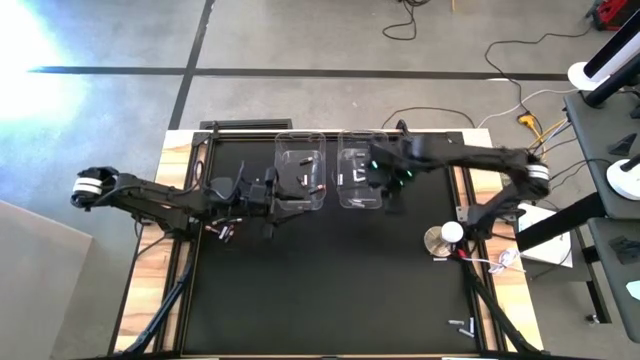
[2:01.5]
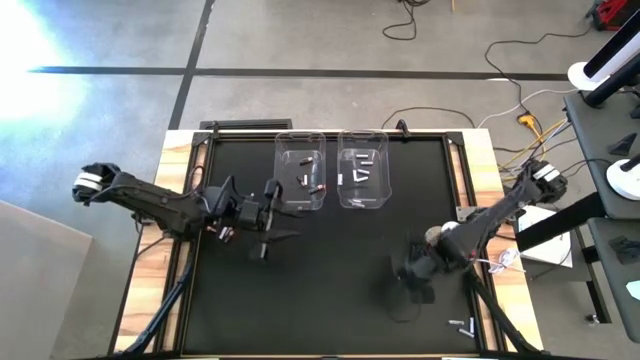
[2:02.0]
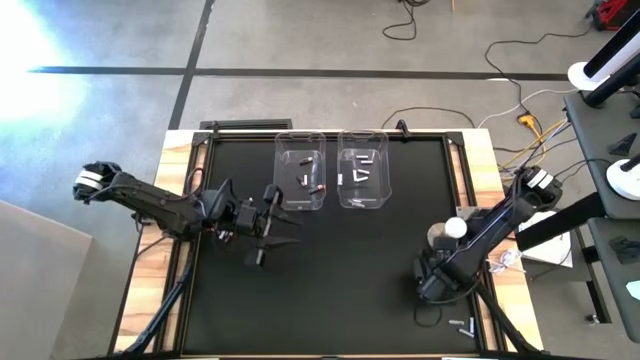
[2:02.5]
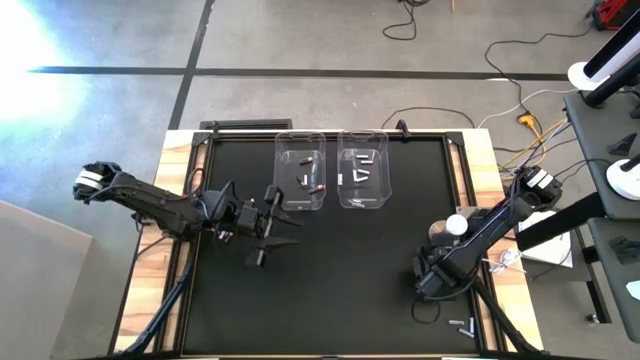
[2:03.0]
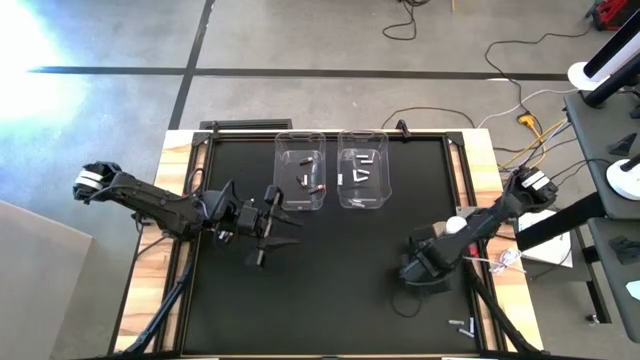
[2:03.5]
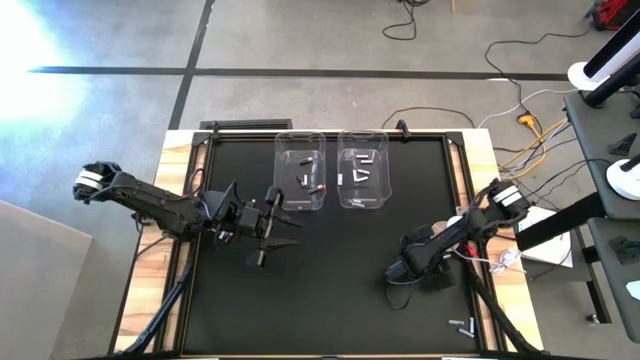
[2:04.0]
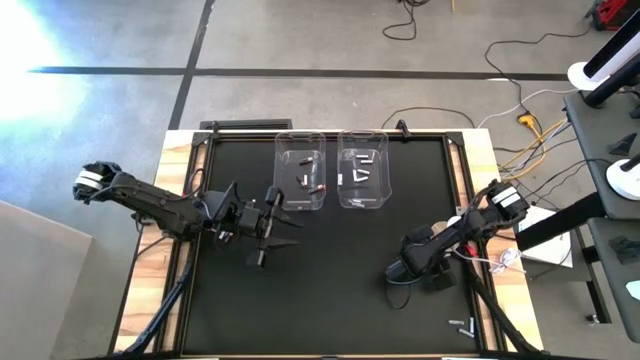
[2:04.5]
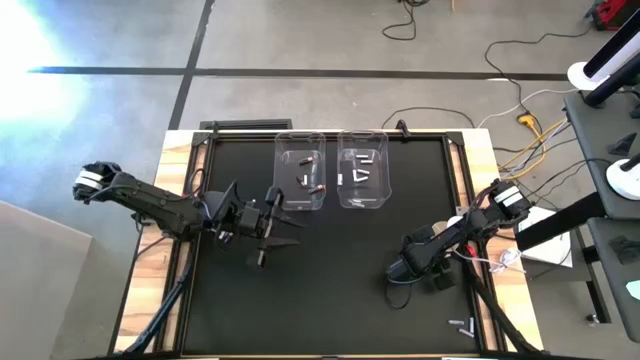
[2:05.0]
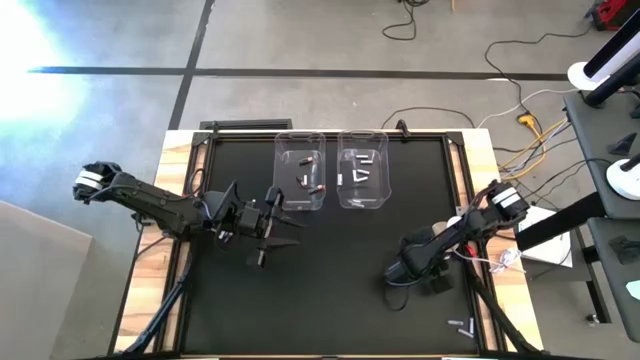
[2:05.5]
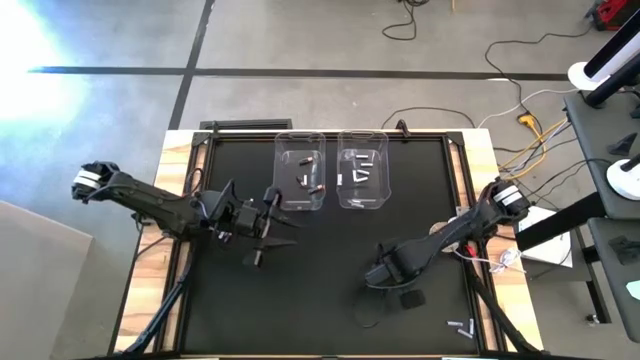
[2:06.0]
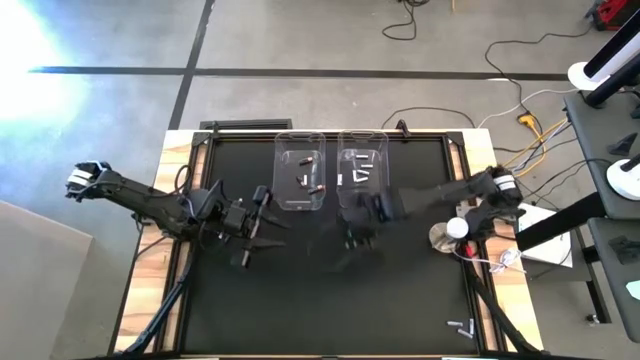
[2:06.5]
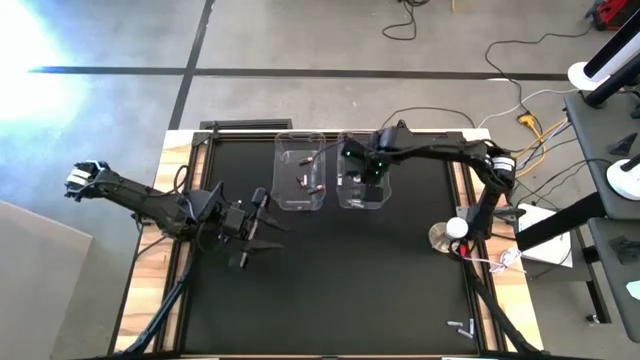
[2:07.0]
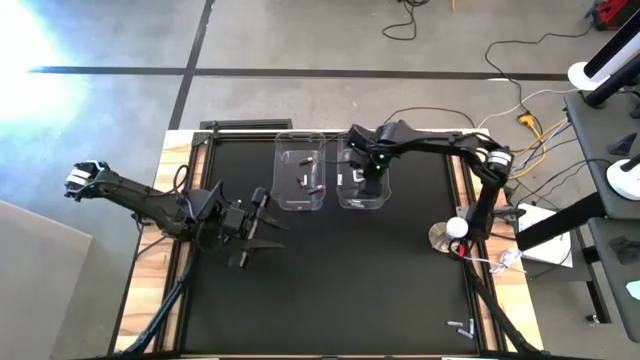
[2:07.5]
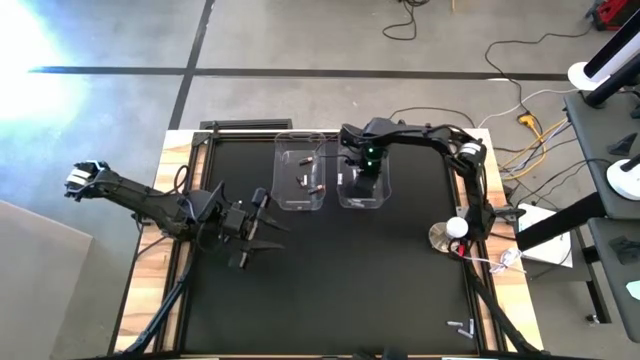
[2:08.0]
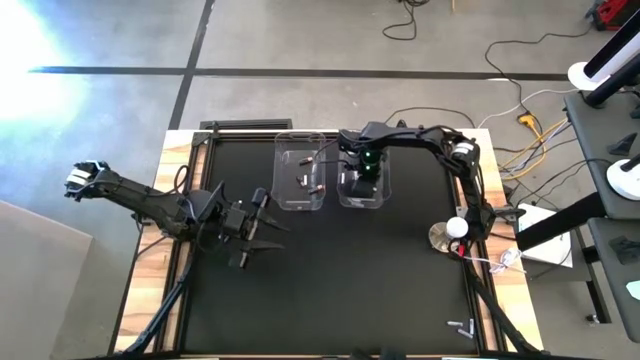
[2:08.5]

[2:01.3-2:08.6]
Task: Sort batteries
Put the white battery into the right transparent bin

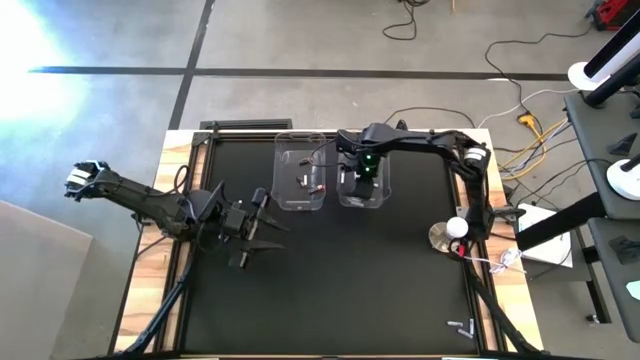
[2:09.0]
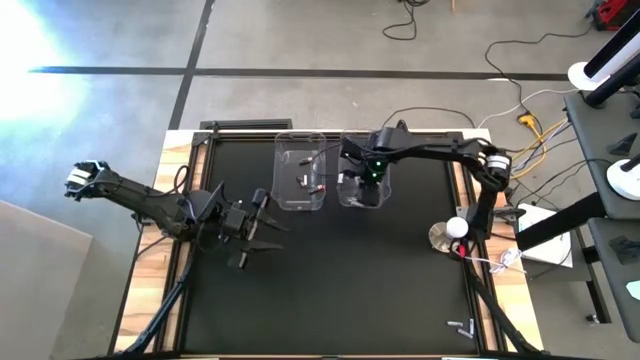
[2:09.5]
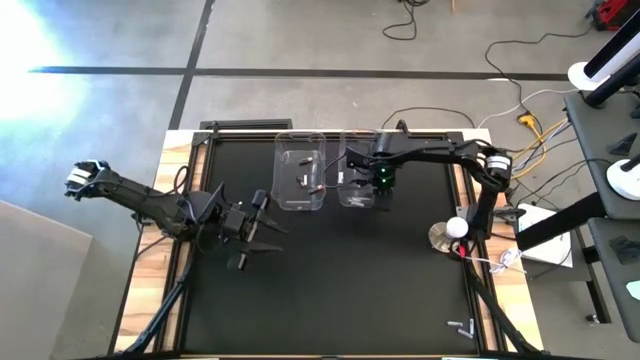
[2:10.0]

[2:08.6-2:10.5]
Adjust the right transparent bin

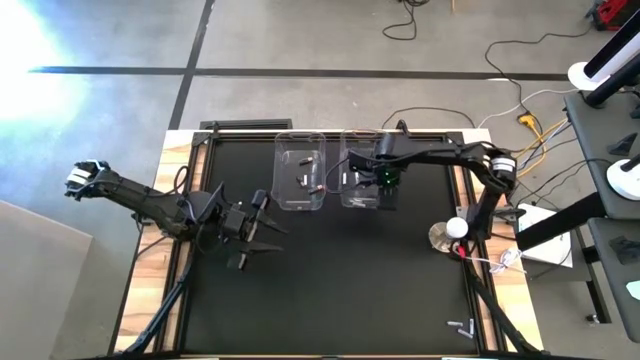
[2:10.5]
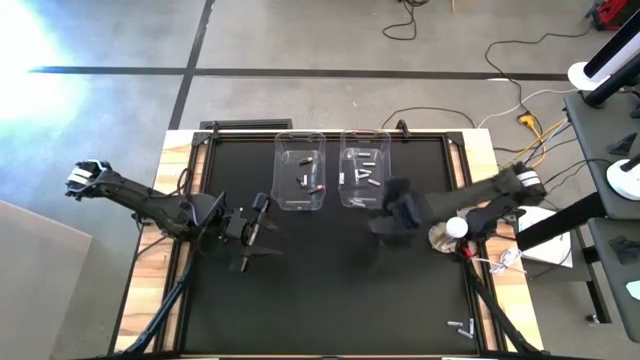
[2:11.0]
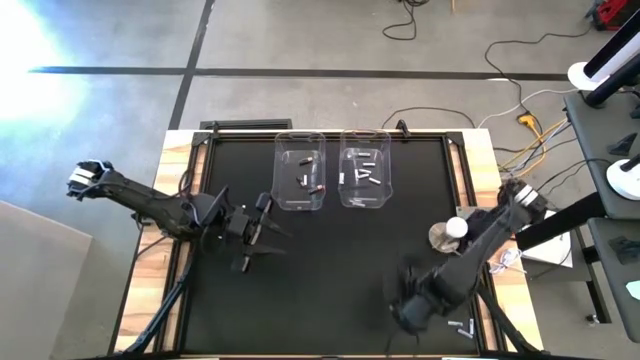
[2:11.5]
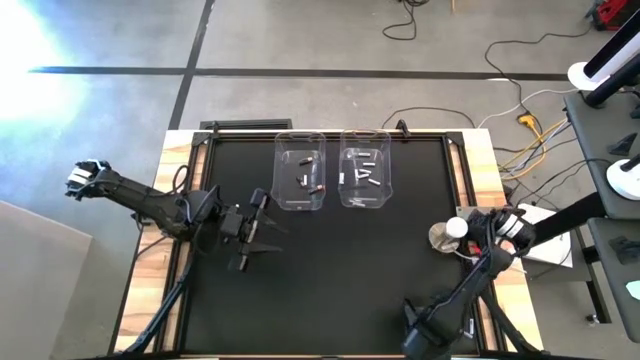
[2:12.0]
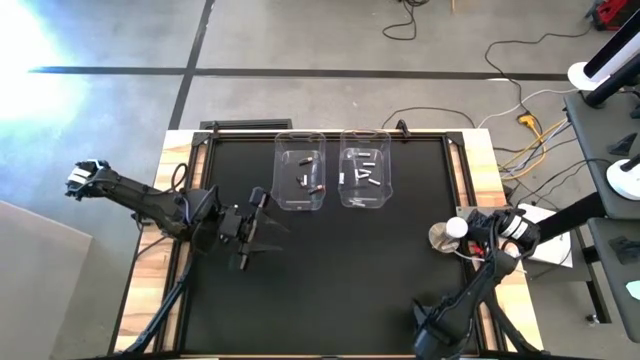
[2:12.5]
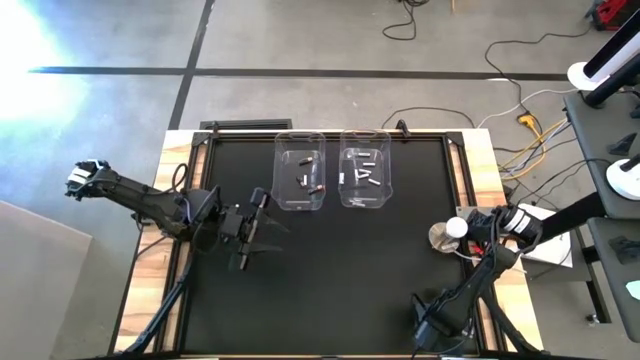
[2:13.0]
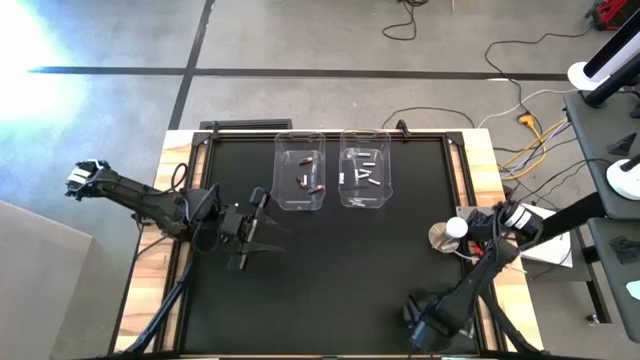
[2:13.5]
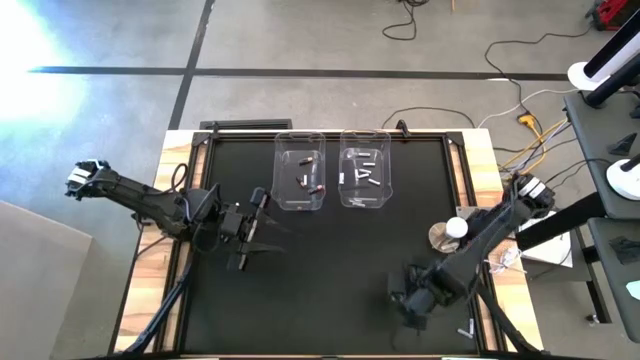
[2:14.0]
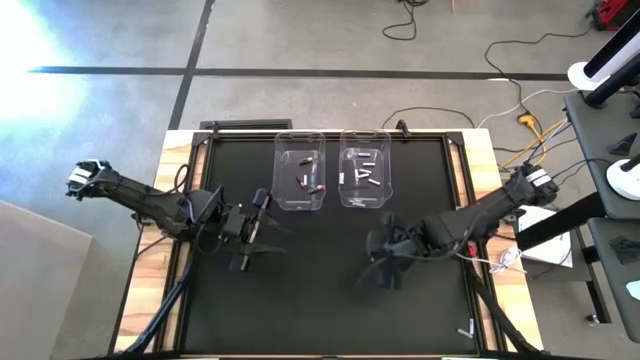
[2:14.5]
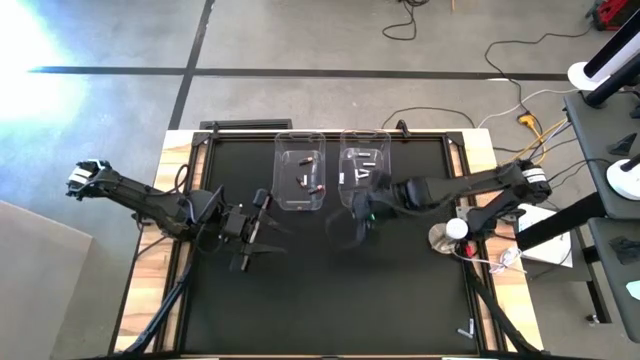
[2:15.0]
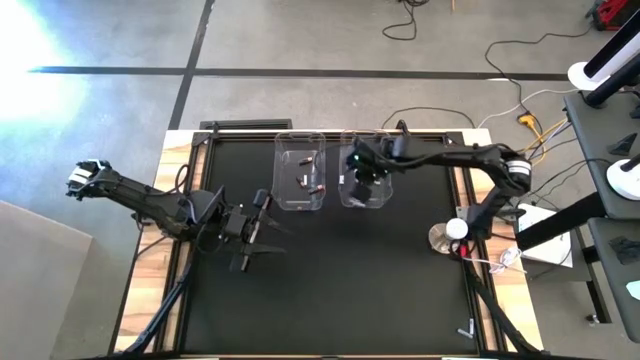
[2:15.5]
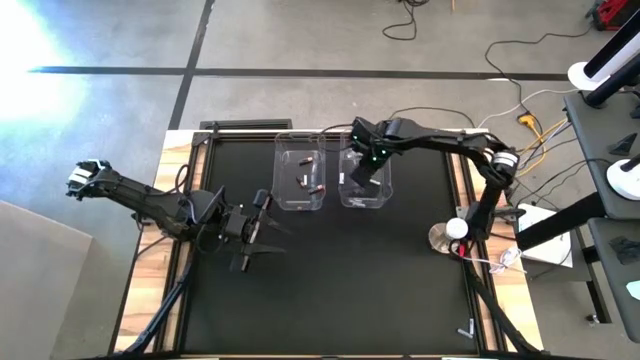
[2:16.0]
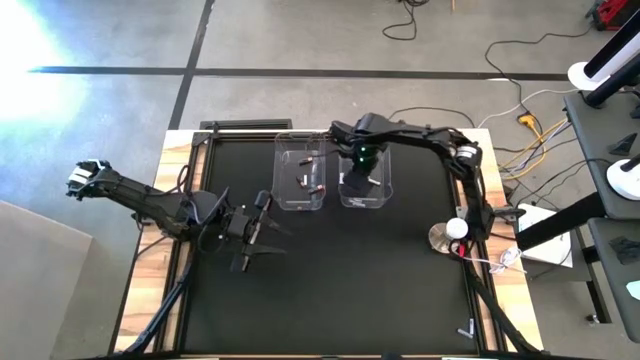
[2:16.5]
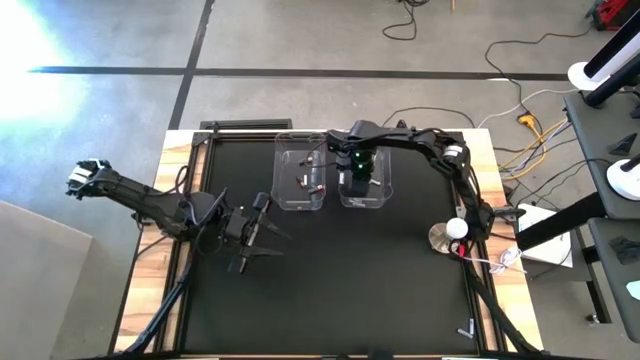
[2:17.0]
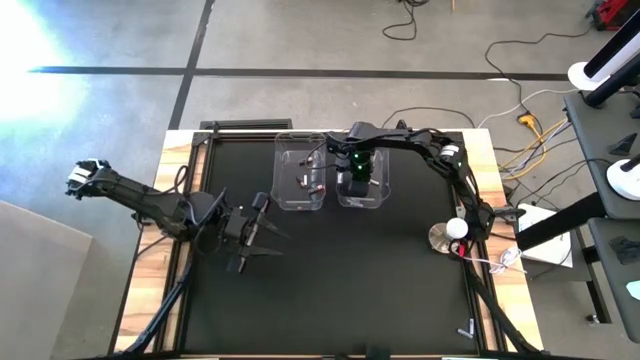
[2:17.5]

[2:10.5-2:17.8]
Put the white battery into the right transparent bin

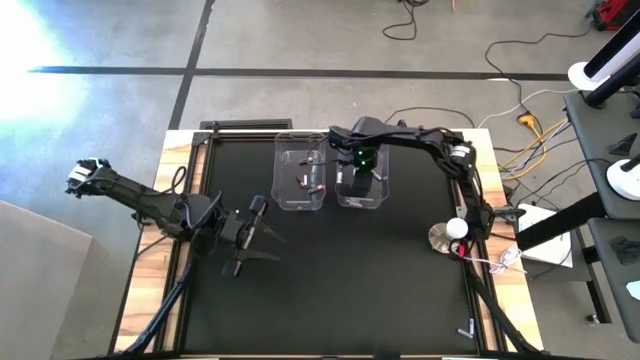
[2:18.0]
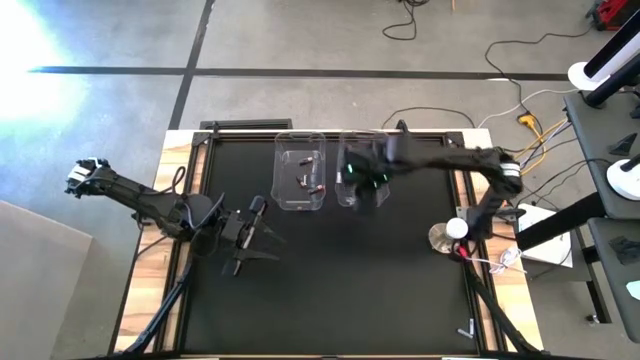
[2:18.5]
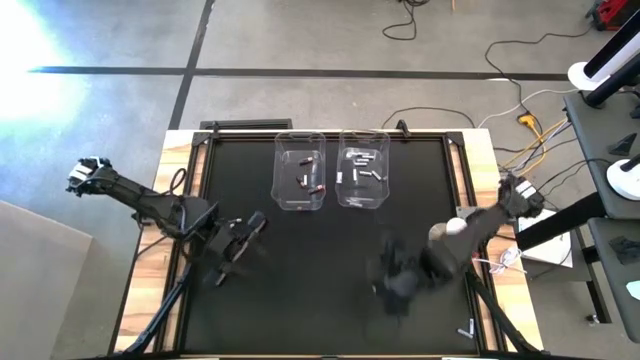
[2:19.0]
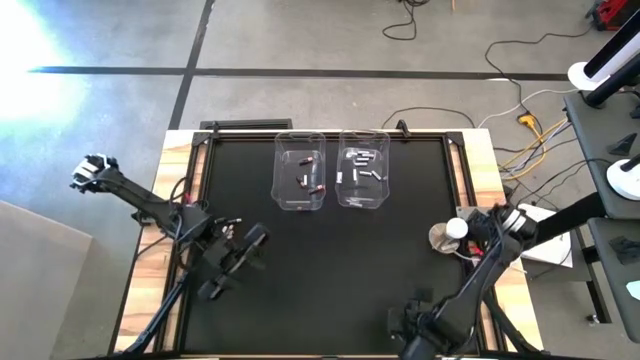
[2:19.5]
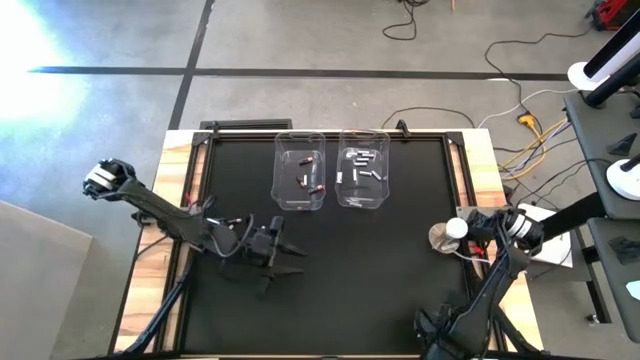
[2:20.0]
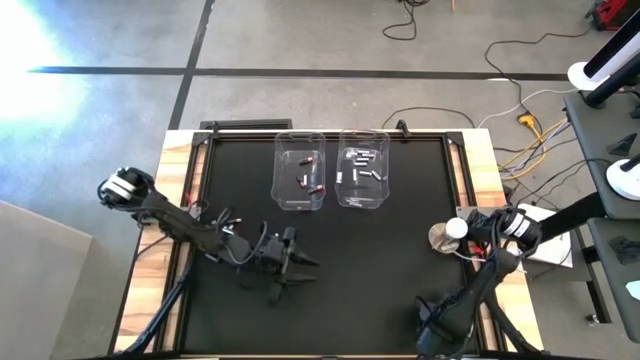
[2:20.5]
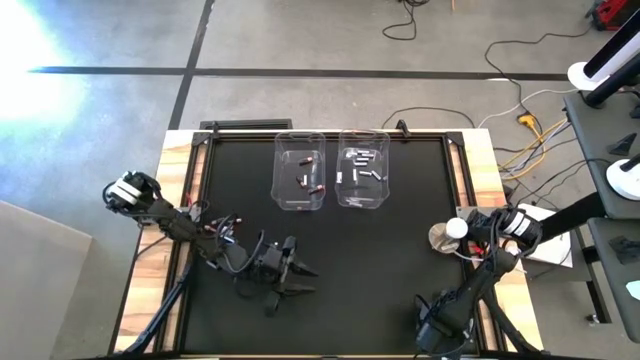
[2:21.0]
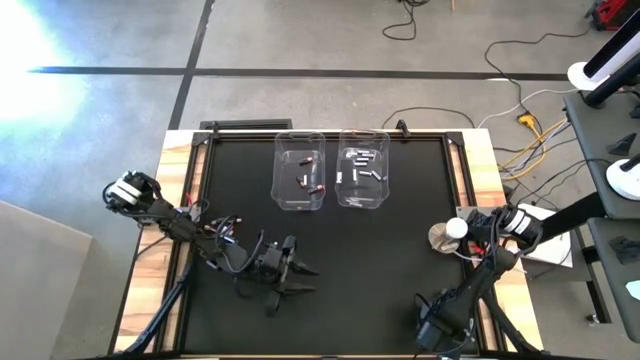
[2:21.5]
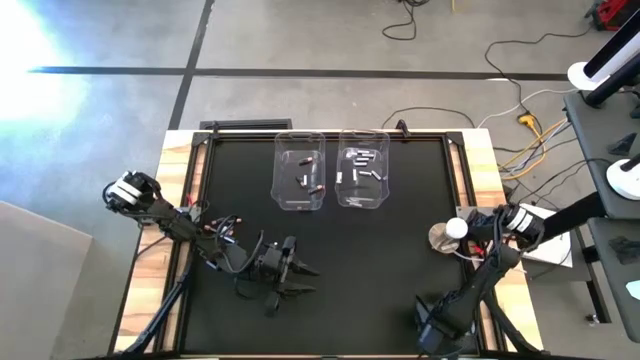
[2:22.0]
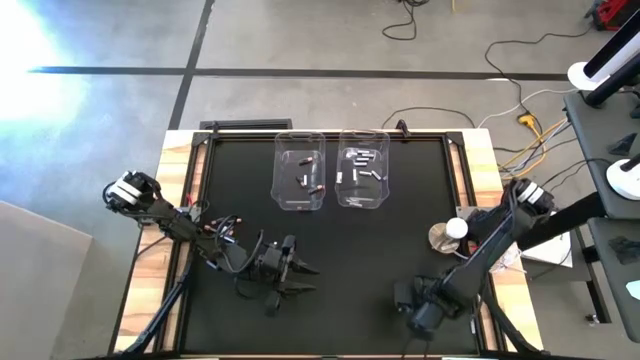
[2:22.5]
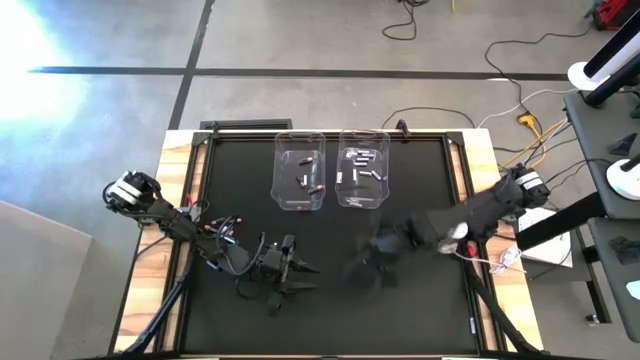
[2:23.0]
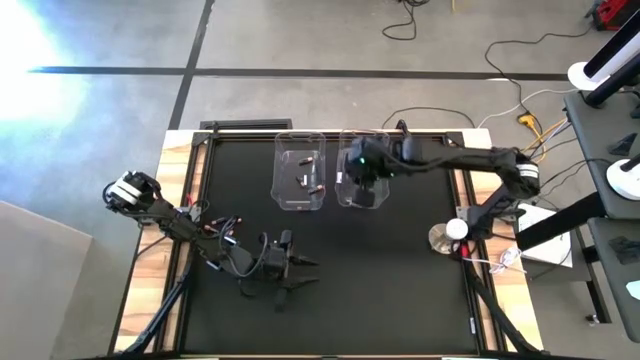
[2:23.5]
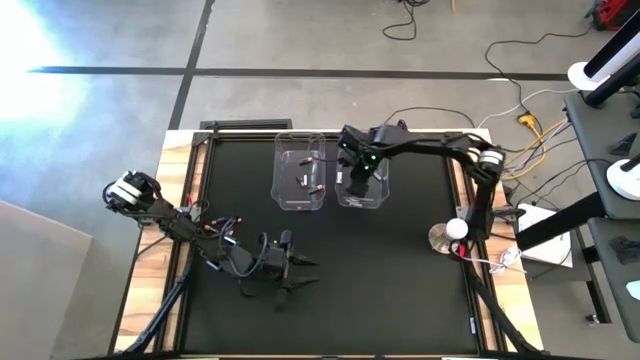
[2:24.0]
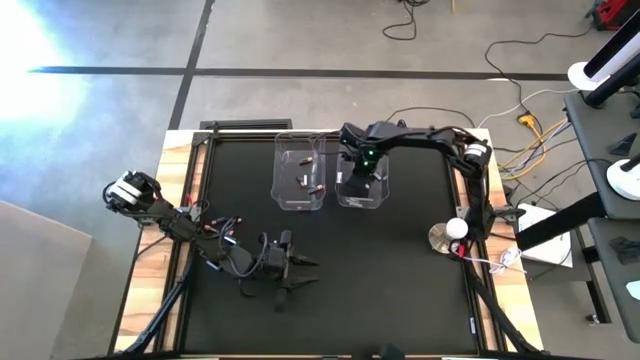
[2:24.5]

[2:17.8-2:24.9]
Put the white battery into the right transparent bin
